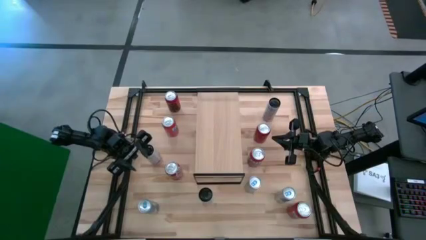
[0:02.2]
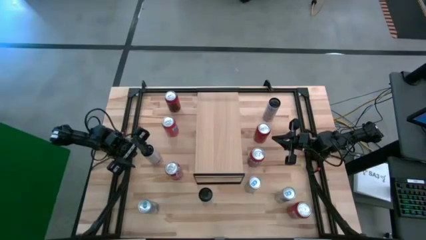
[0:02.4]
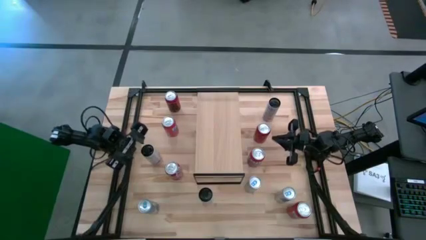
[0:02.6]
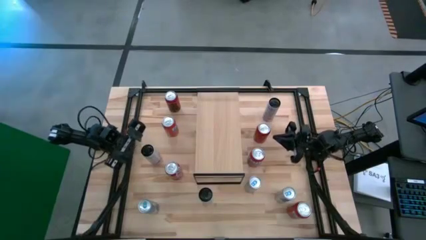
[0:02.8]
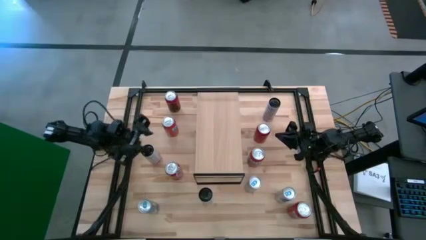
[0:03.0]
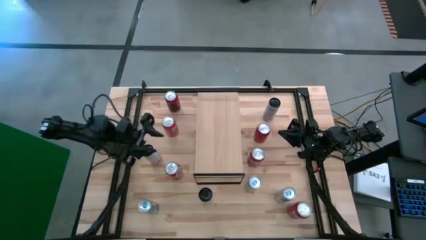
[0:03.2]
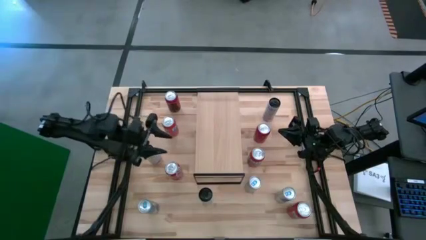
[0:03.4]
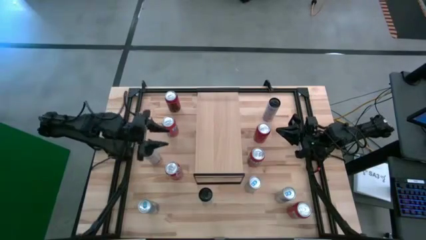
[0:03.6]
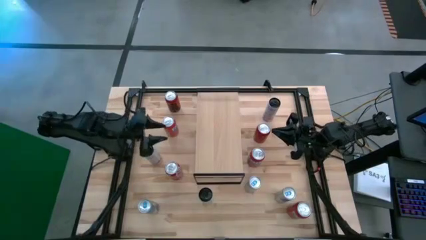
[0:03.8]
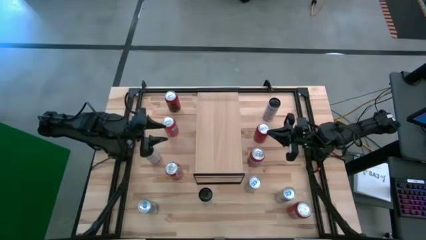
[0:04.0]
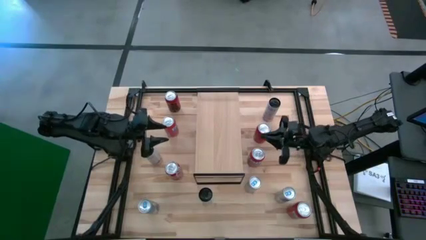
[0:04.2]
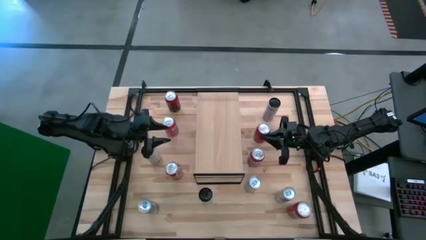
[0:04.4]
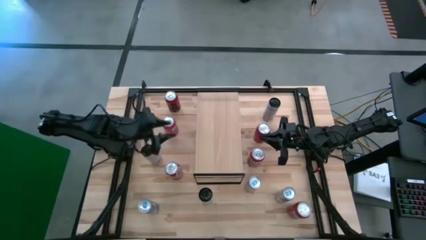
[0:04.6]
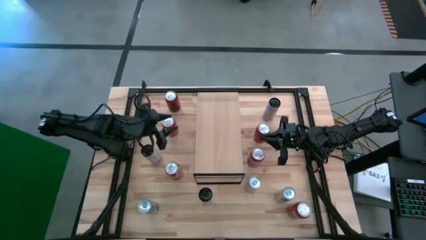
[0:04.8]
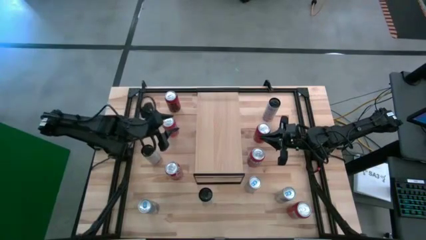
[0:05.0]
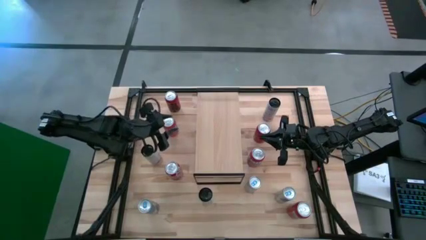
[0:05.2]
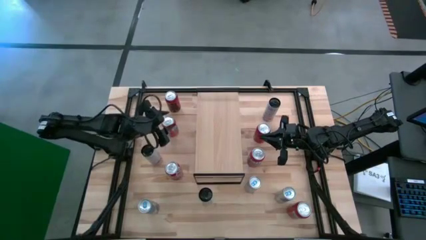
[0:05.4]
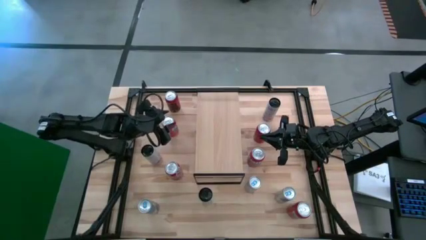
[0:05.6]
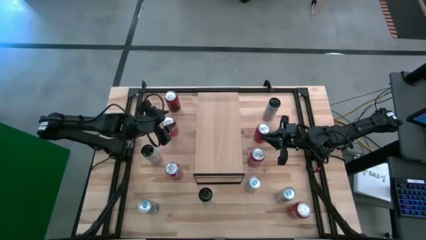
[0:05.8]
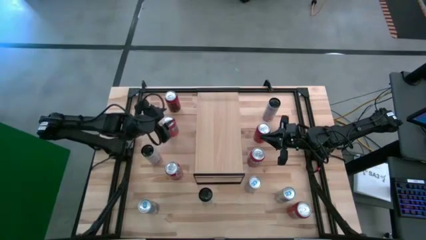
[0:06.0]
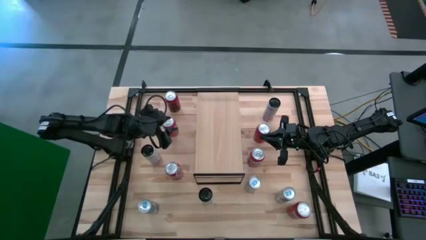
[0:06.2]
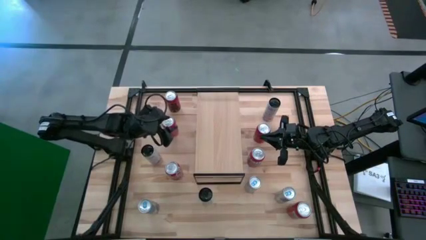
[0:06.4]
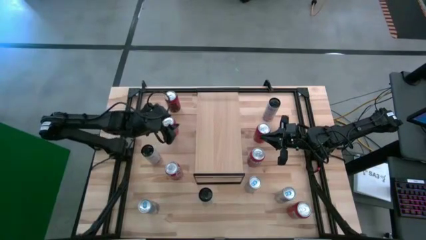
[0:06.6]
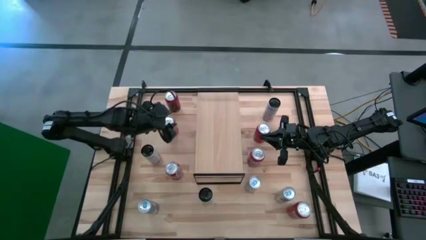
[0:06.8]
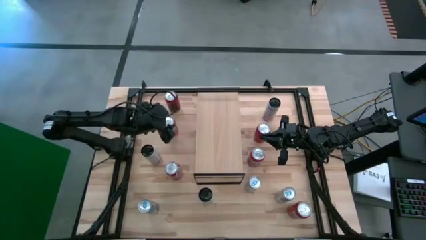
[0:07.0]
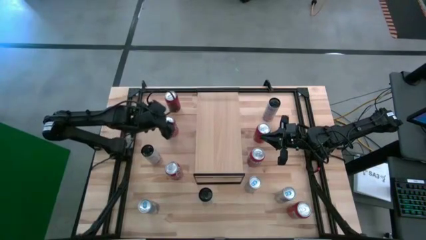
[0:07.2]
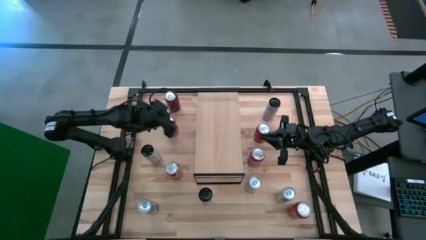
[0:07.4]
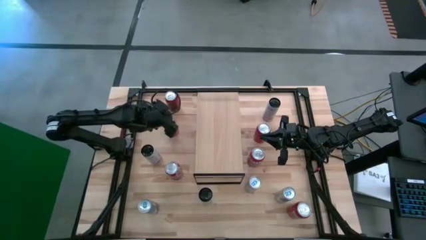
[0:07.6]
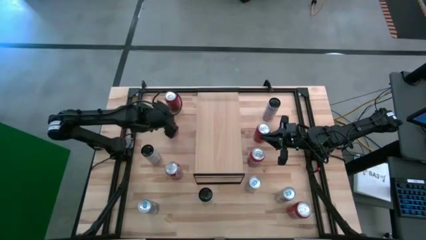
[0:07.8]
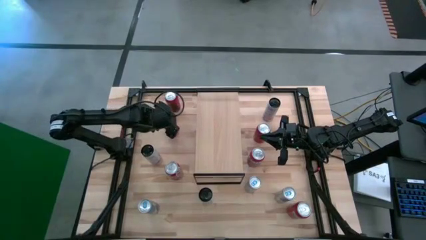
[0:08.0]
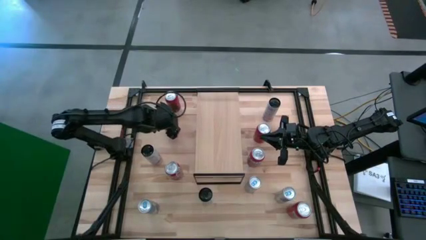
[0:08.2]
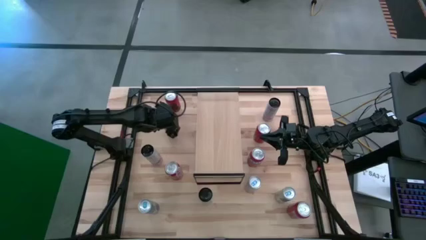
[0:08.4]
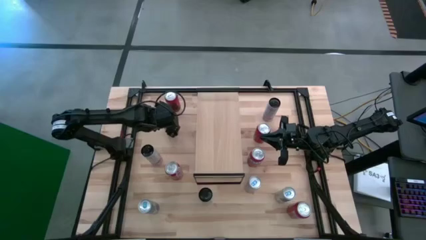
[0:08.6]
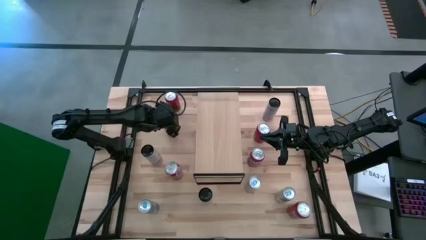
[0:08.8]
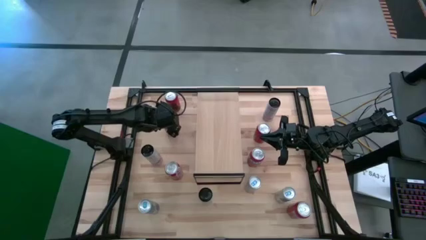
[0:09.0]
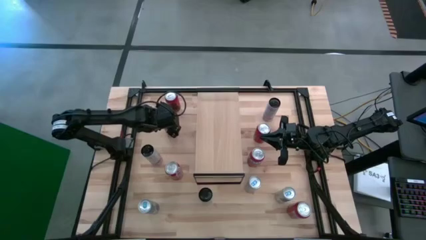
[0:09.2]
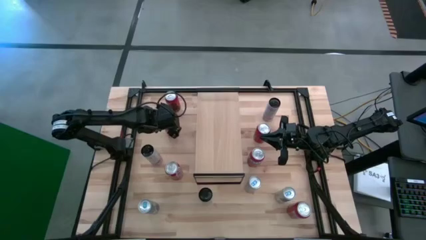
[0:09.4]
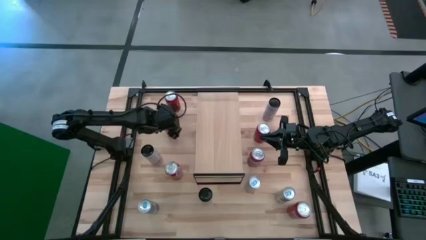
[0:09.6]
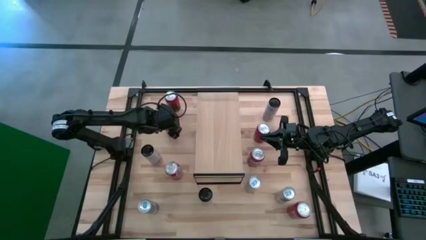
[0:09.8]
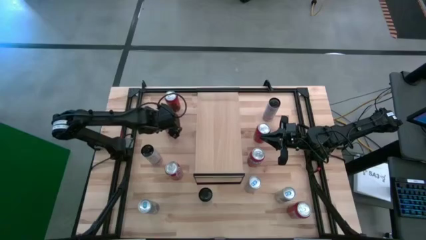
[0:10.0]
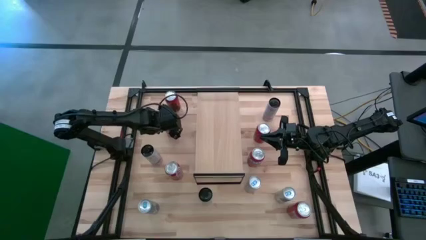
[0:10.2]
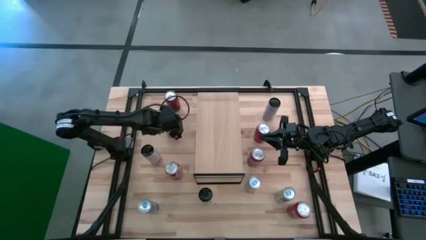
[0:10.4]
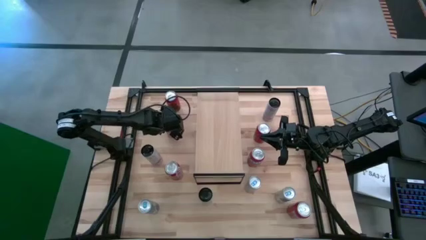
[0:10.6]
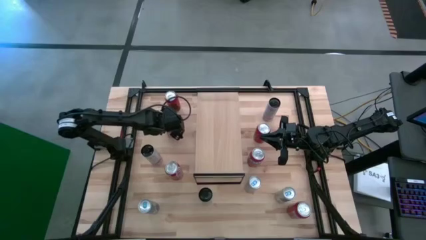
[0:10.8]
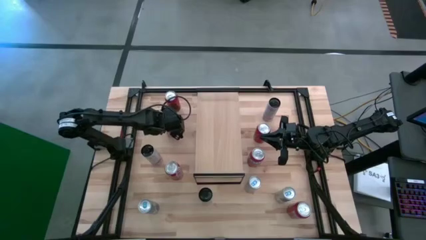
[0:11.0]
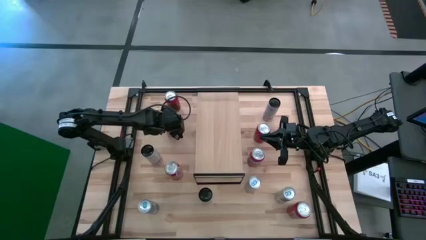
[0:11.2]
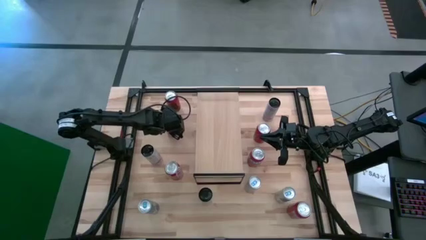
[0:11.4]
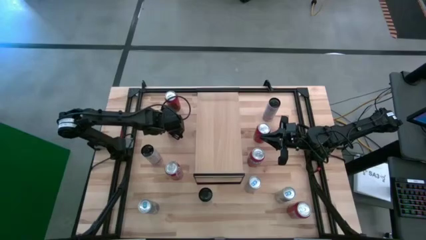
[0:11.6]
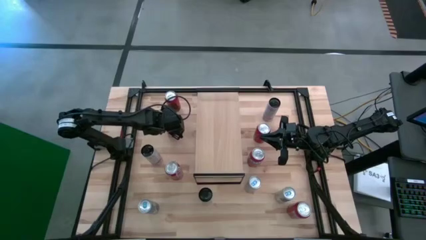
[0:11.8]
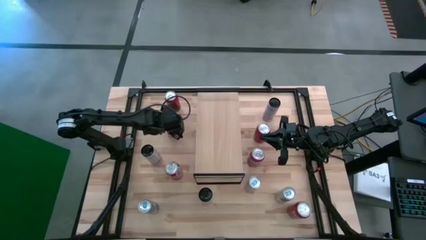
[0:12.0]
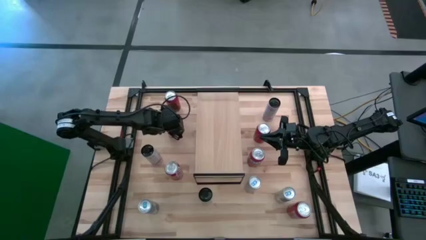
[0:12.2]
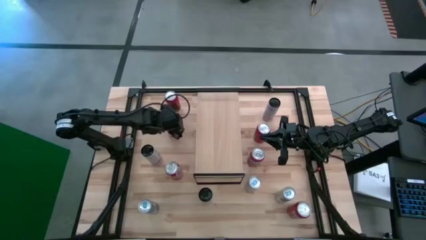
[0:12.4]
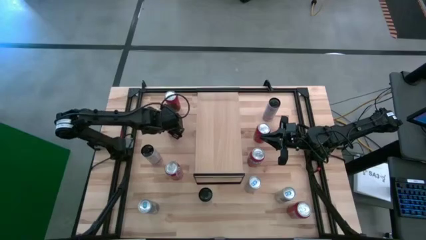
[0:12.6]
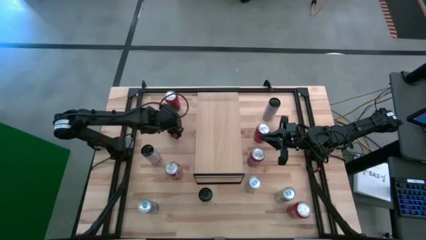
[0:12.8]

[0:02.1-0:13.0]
Task: Place canned beverage on shelf
Put the top left orange soda can on the shelf
